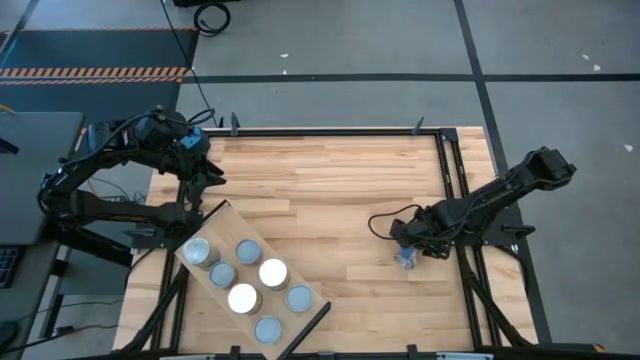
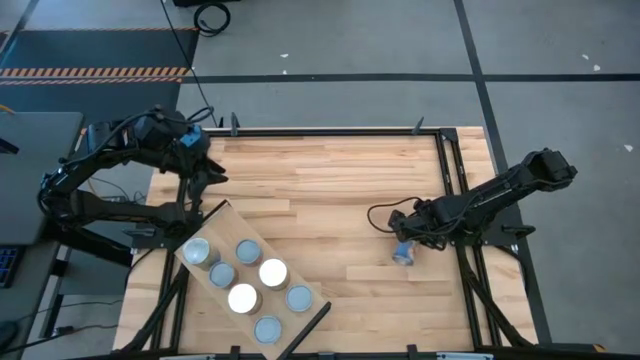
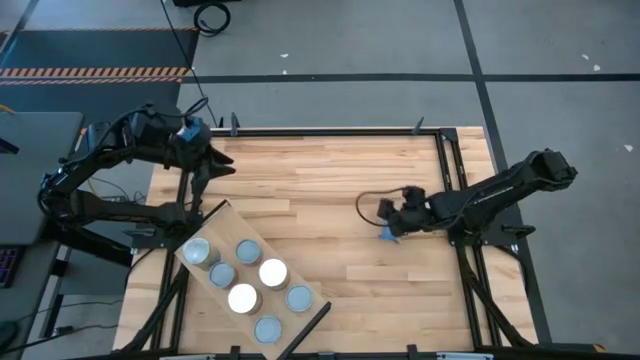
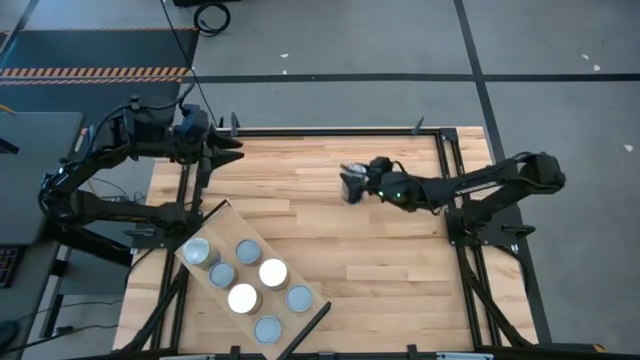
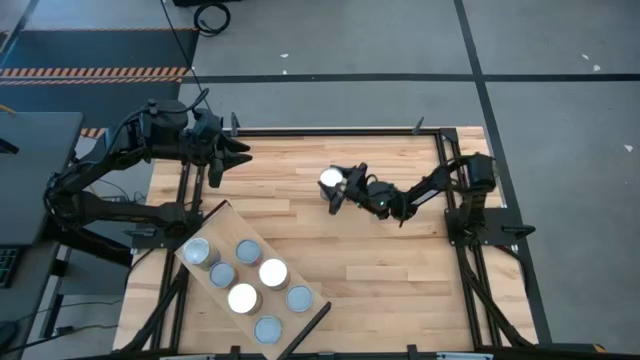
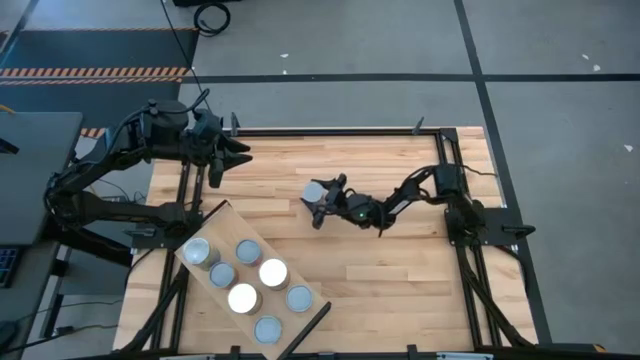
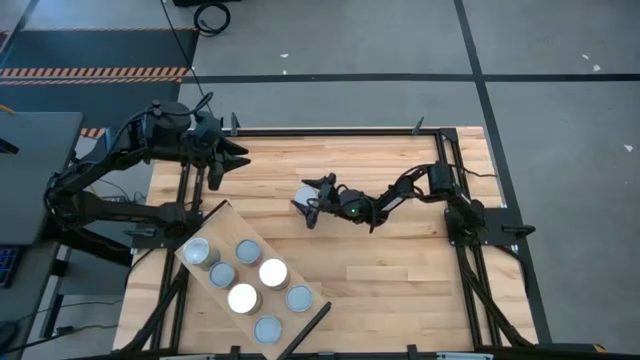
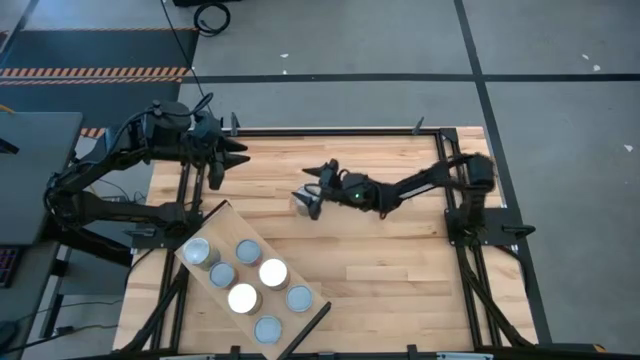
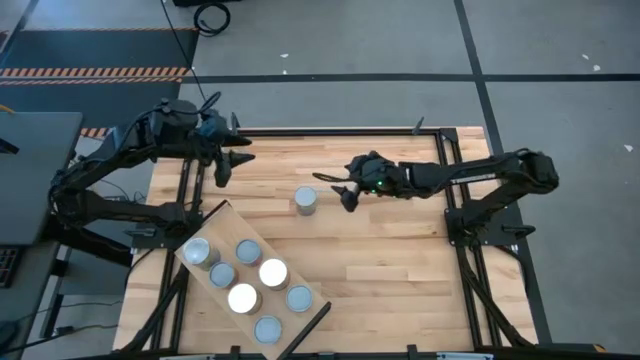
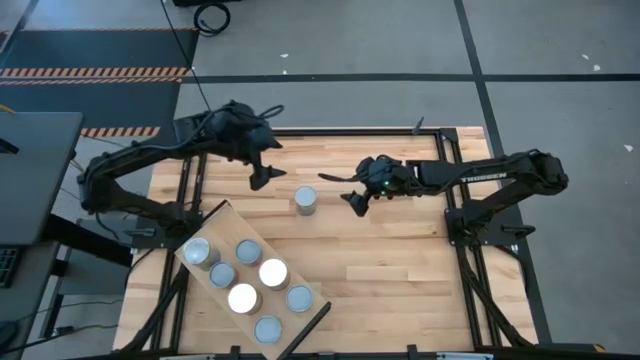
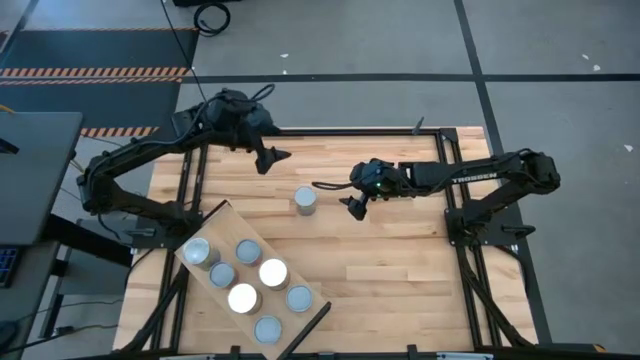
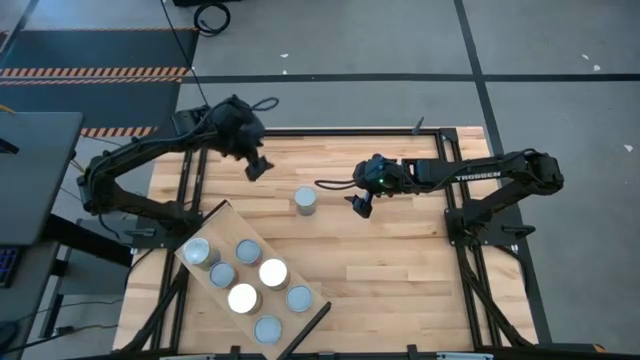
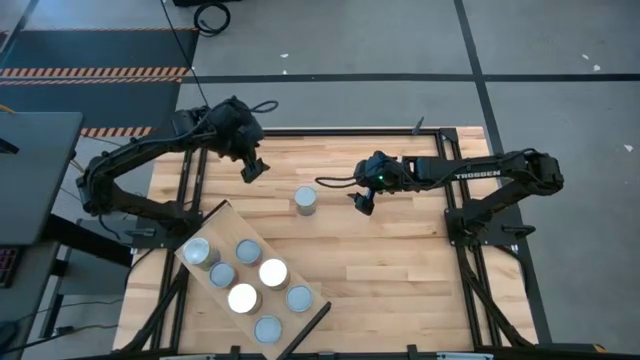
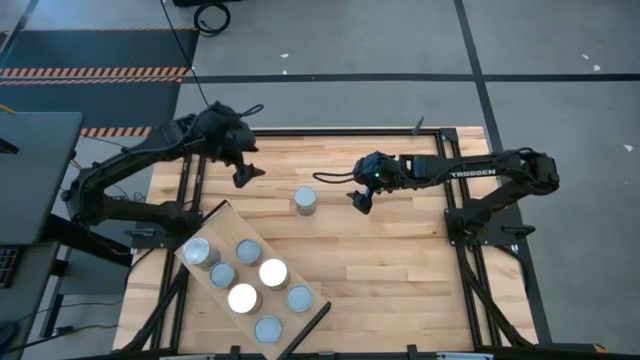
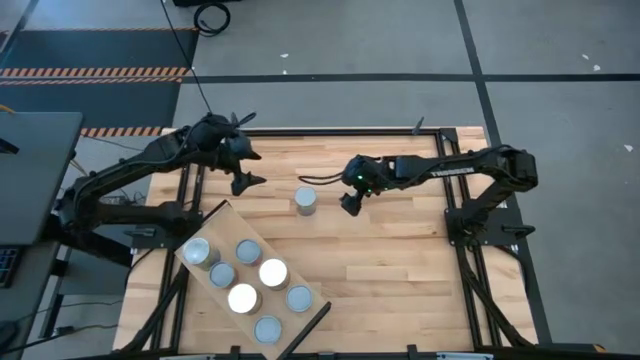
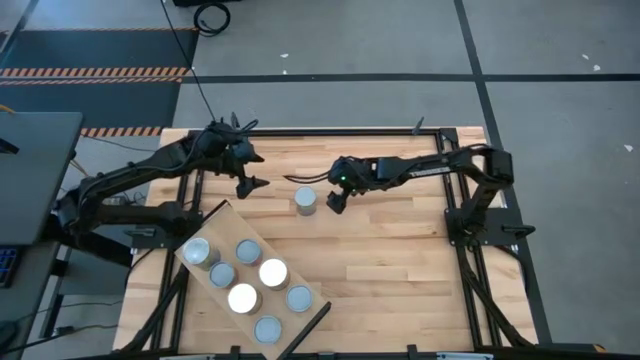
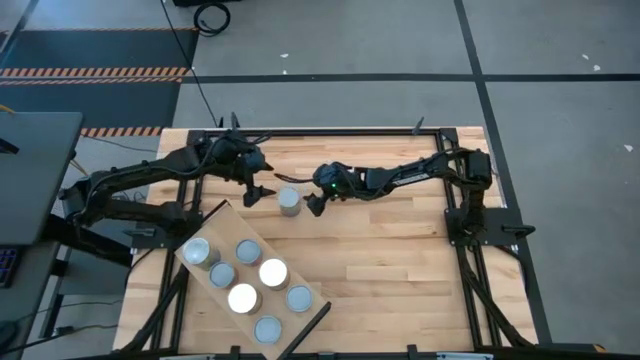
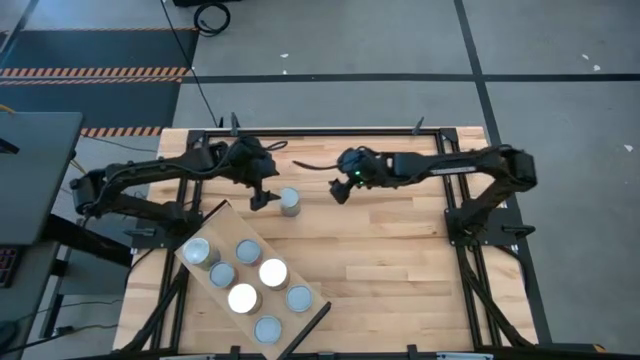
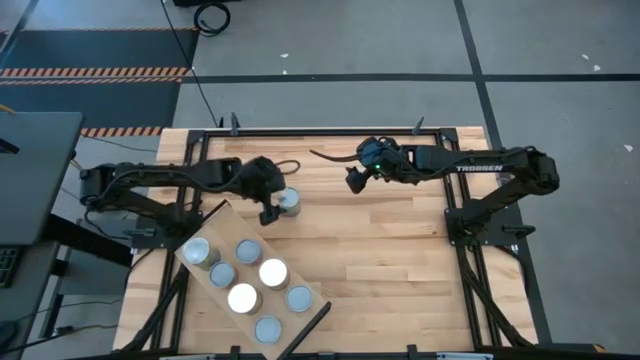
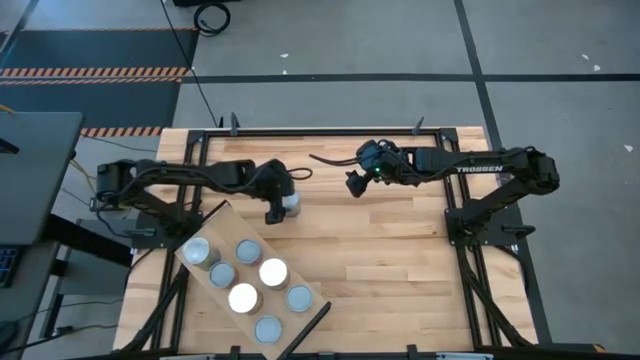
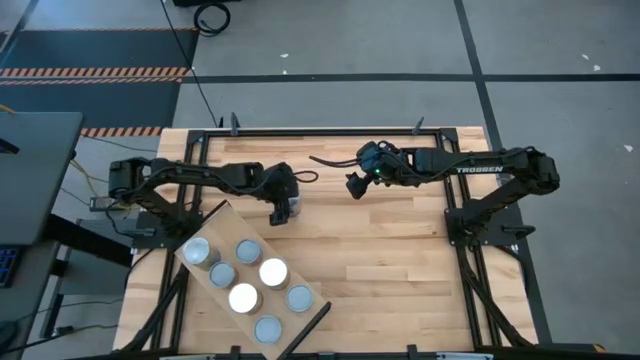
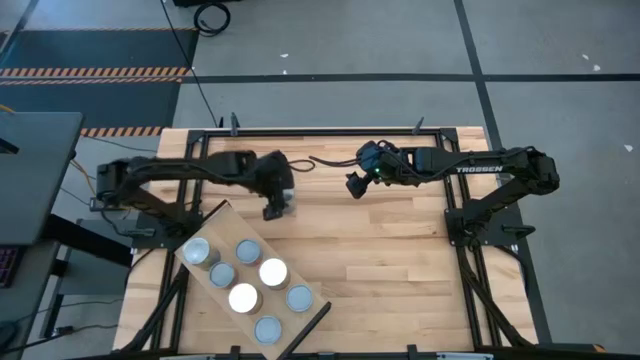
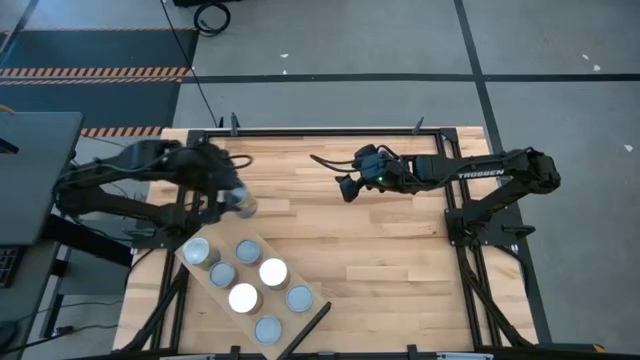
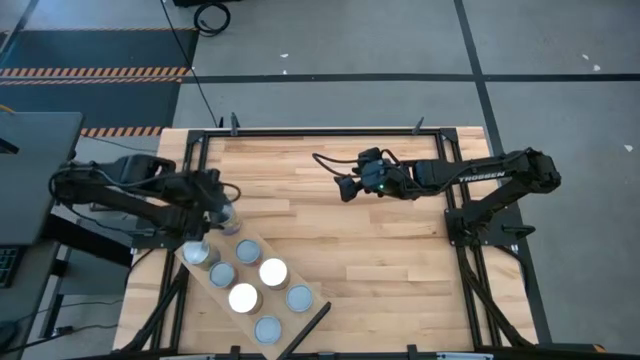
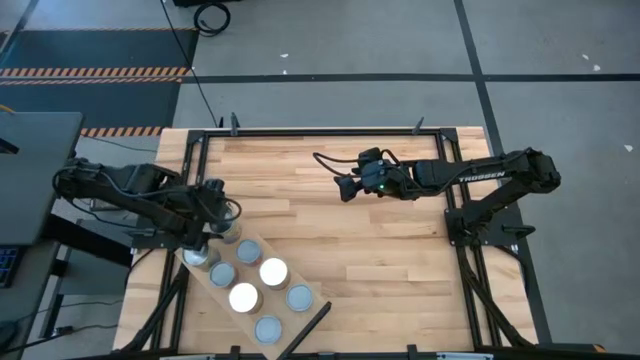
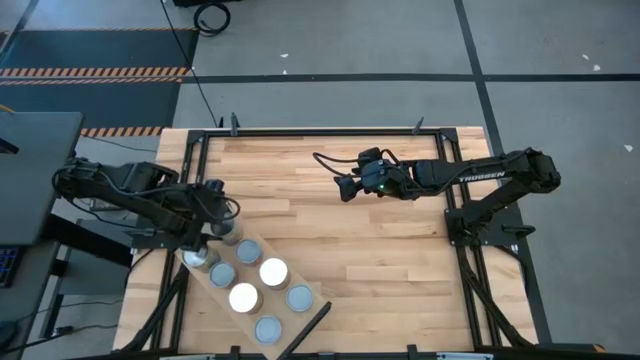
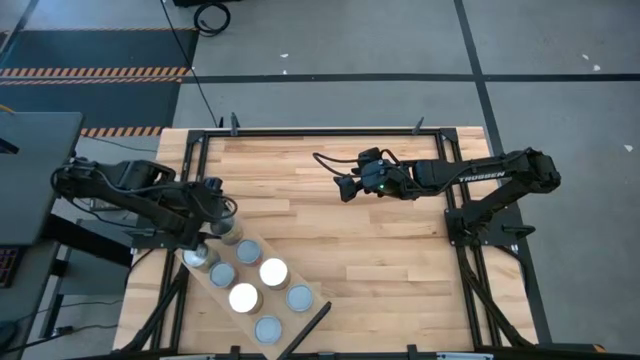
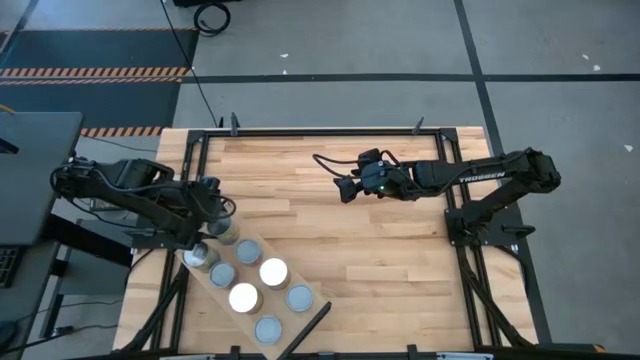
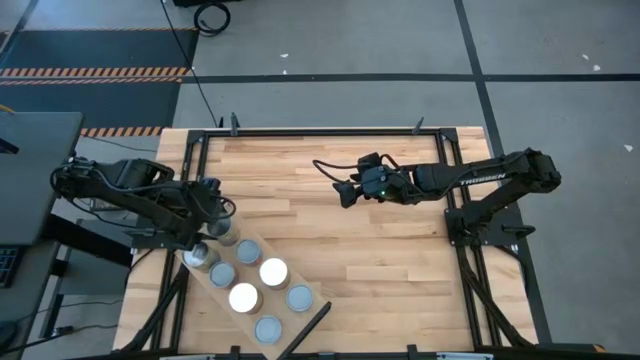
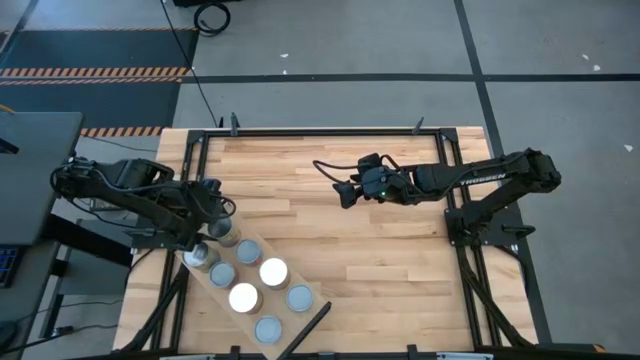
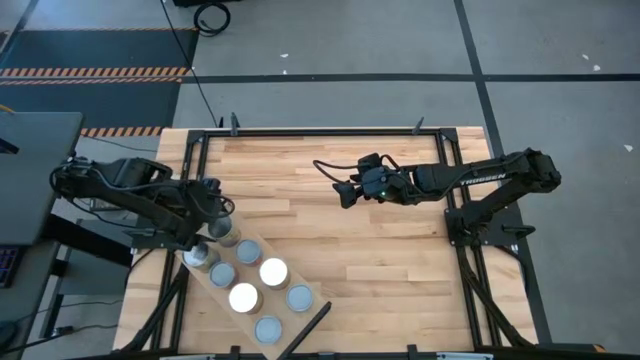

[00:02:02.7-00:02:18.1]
Task: Pick and place cans onto a shelf
Put the canned peaches on the shelf aligned with the other canned peaches

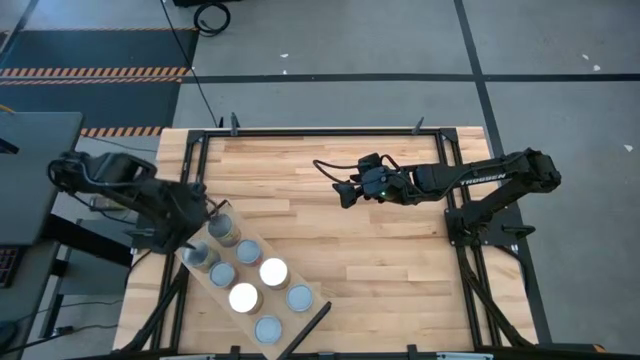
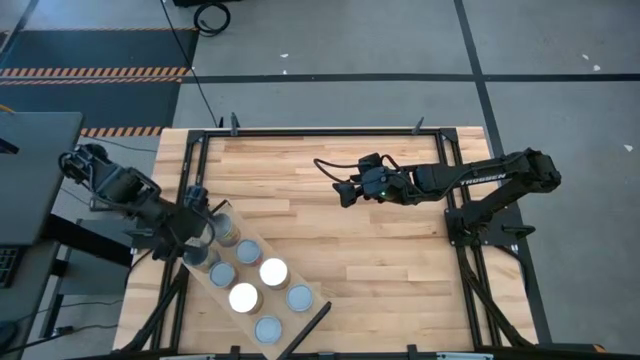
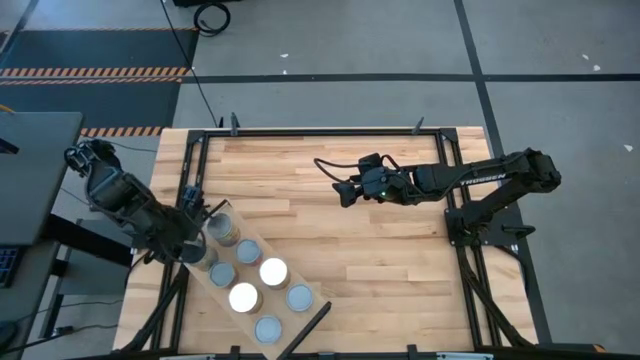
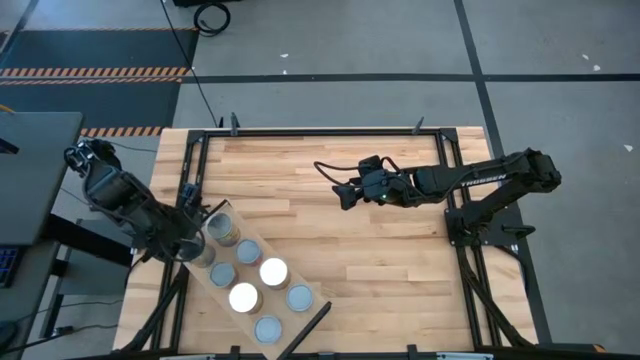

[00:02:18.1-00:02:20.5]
Adjust the canned peaches on the shelf

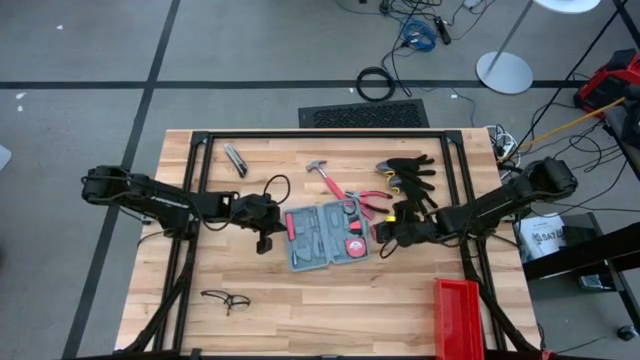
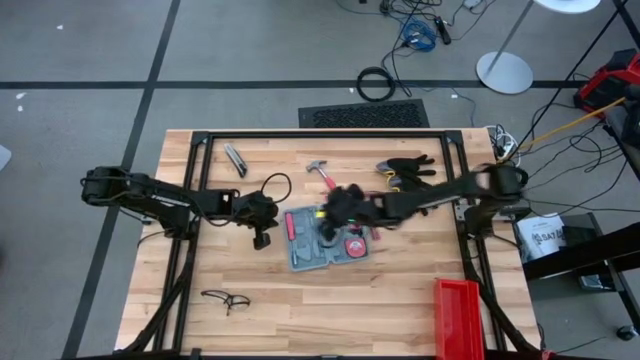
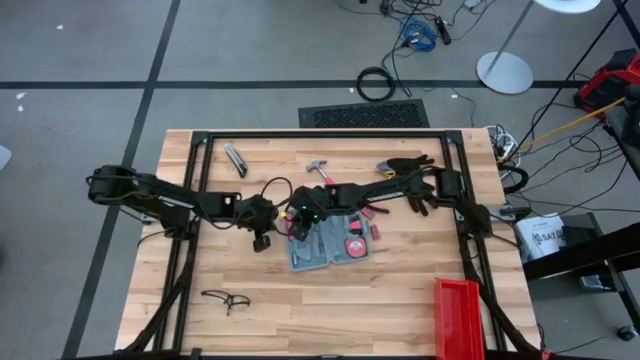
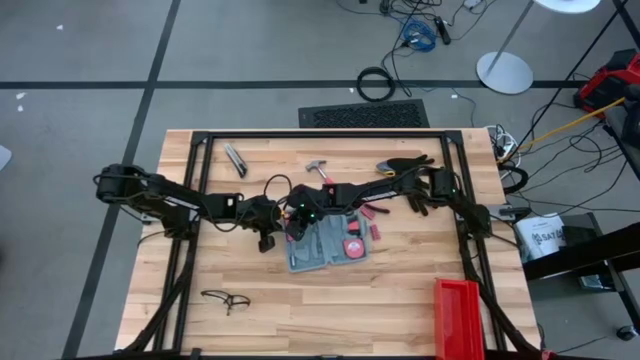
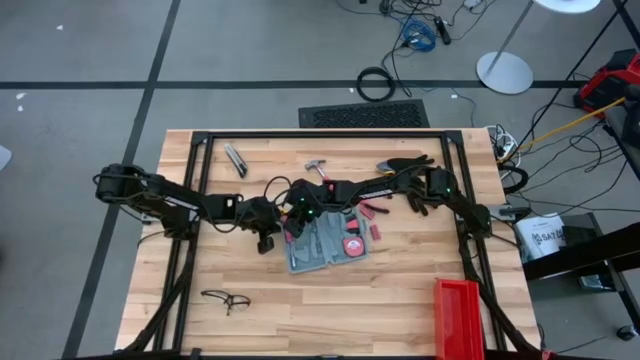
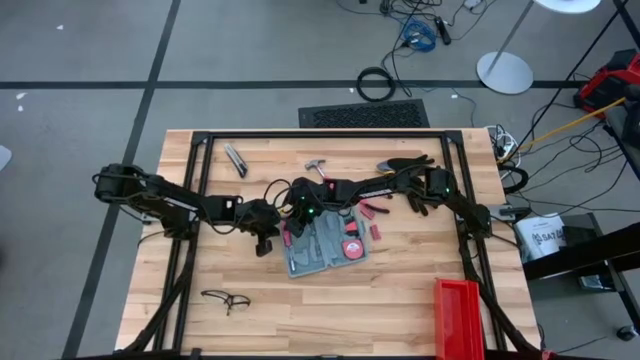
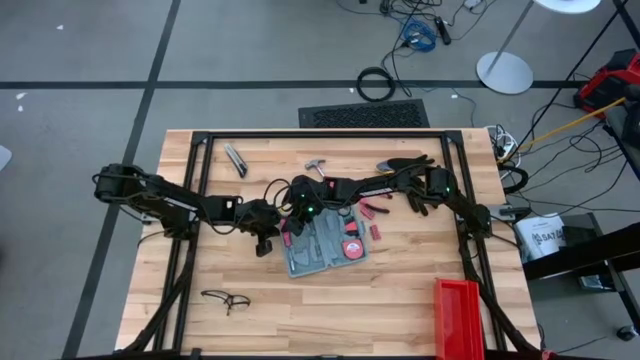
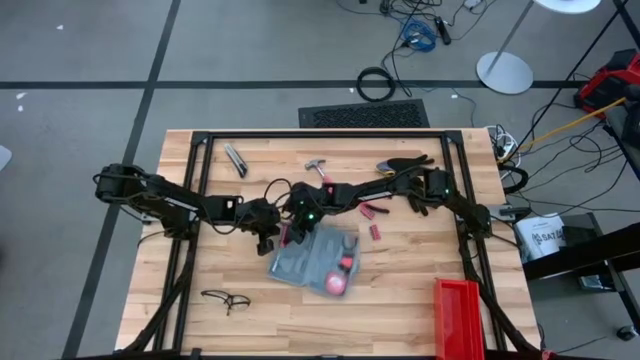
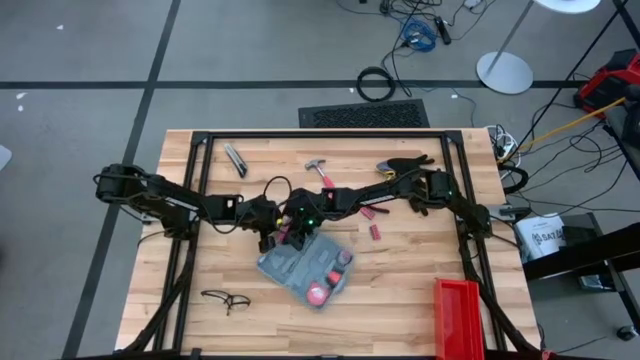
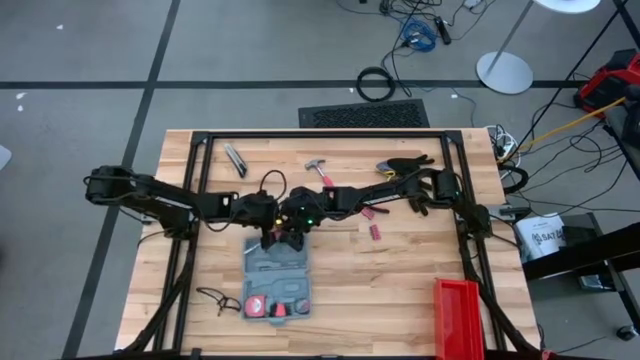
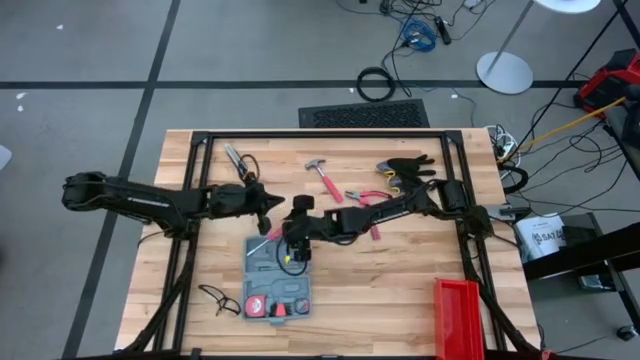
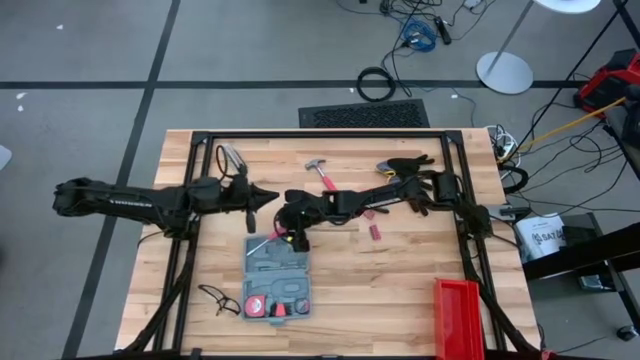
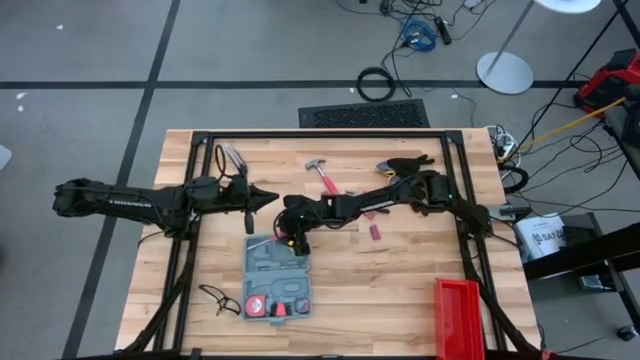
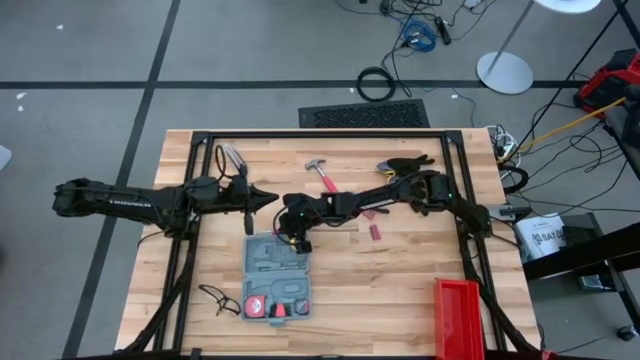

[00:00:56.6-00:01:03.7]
Task: prefit tool cases
Remove the pink screwdriver from the gray prefit tool case
